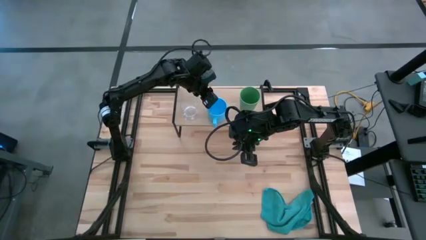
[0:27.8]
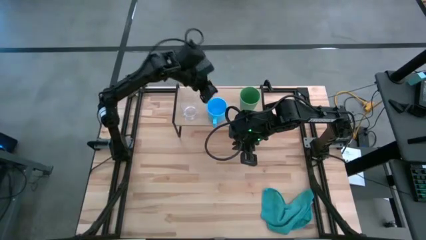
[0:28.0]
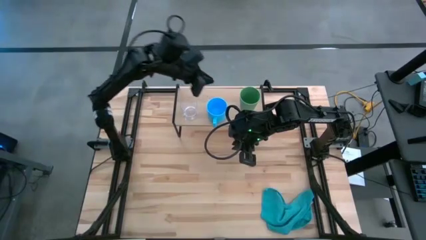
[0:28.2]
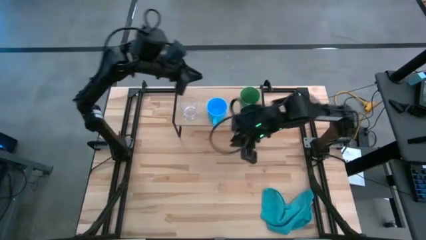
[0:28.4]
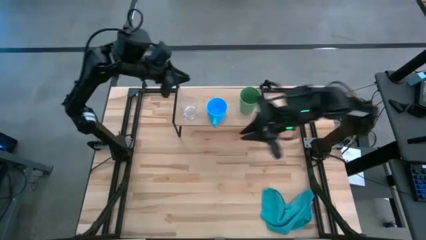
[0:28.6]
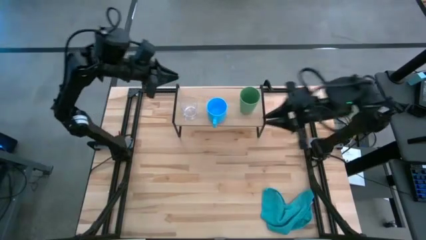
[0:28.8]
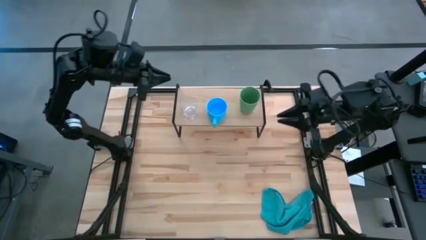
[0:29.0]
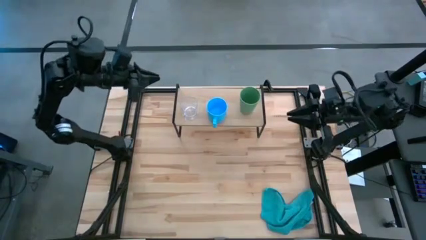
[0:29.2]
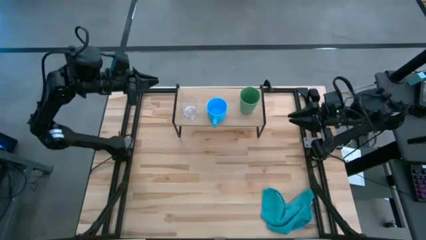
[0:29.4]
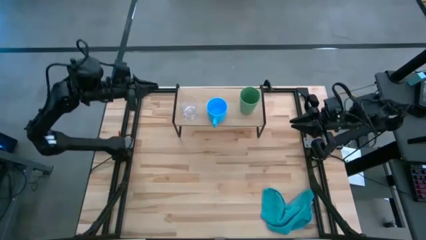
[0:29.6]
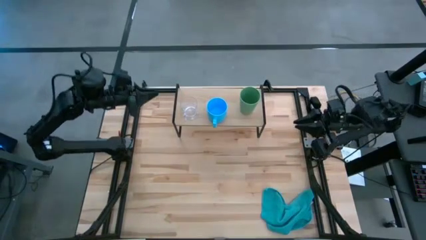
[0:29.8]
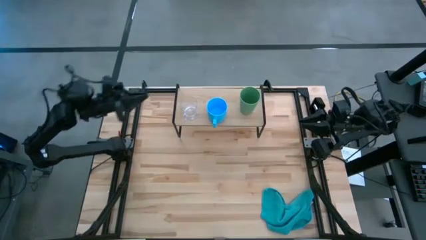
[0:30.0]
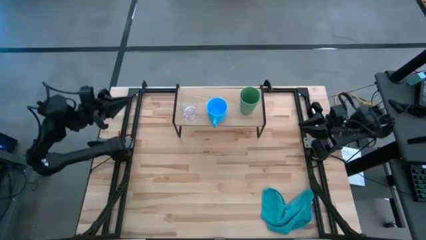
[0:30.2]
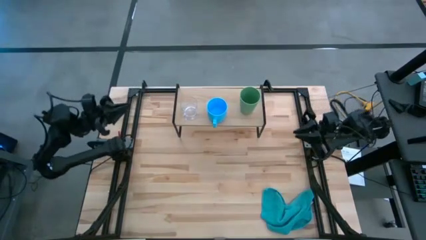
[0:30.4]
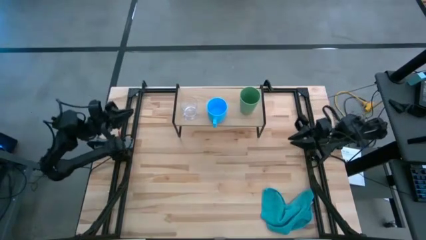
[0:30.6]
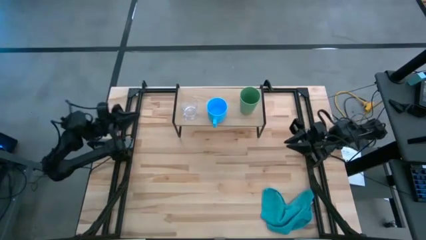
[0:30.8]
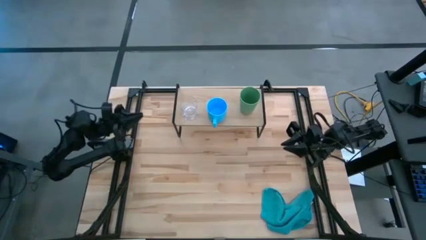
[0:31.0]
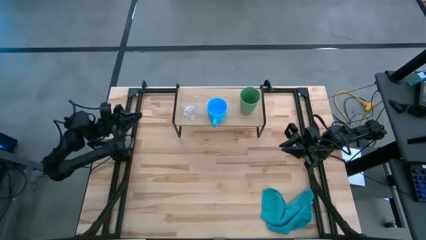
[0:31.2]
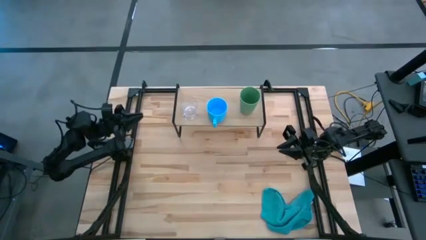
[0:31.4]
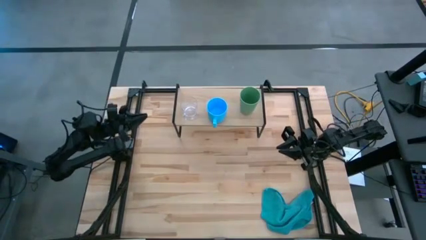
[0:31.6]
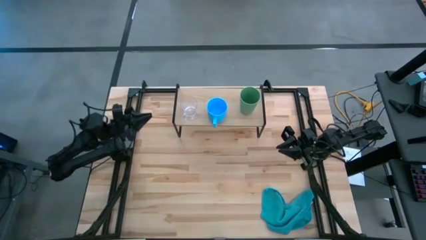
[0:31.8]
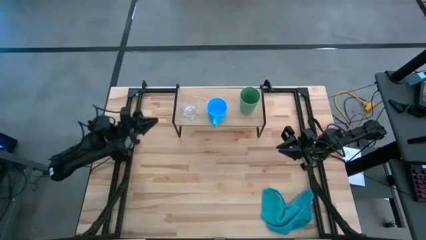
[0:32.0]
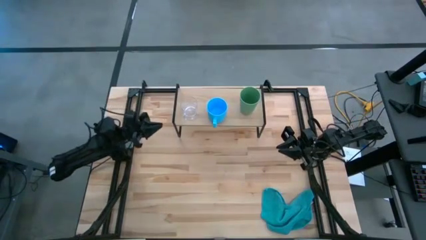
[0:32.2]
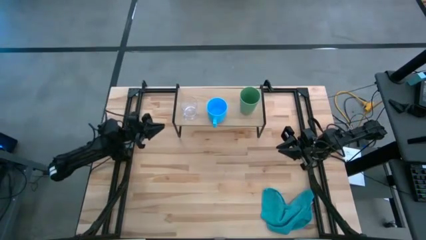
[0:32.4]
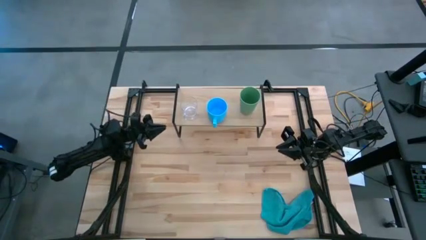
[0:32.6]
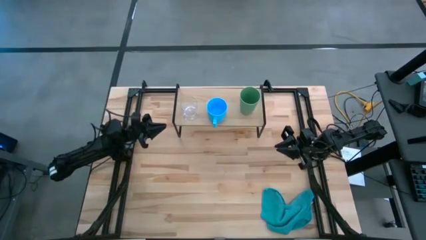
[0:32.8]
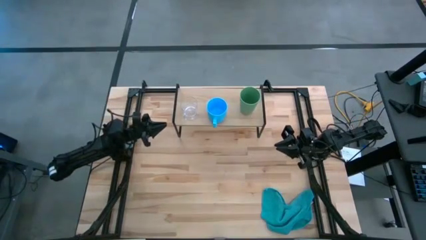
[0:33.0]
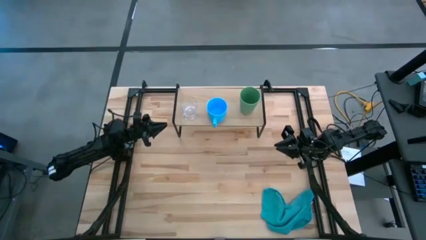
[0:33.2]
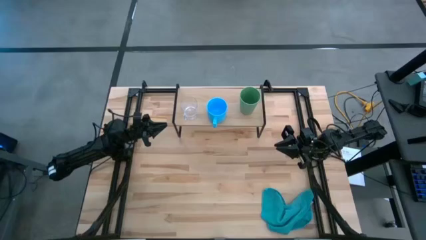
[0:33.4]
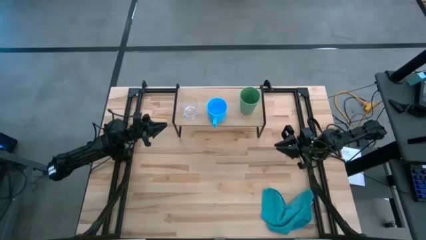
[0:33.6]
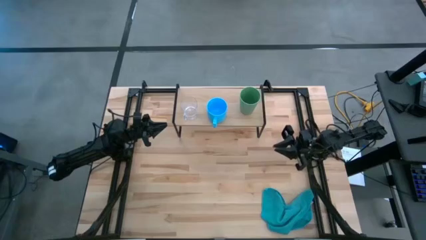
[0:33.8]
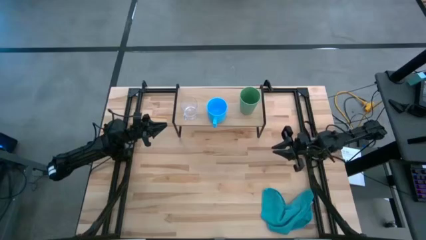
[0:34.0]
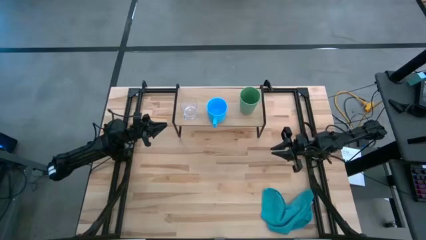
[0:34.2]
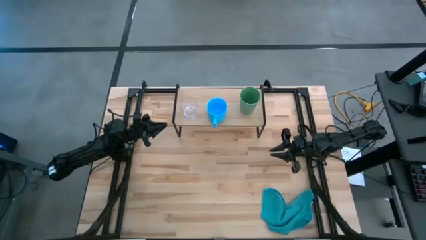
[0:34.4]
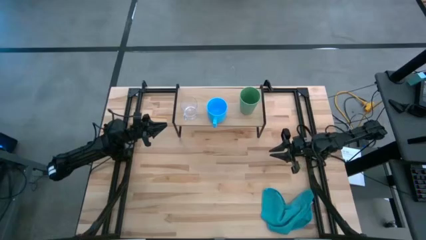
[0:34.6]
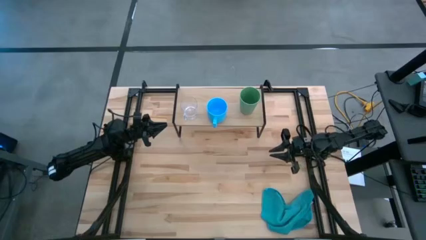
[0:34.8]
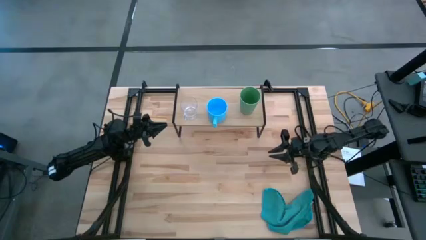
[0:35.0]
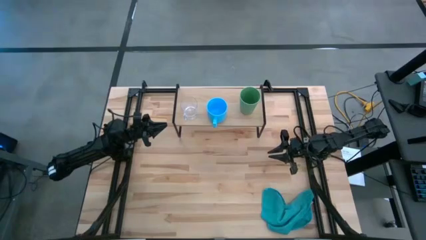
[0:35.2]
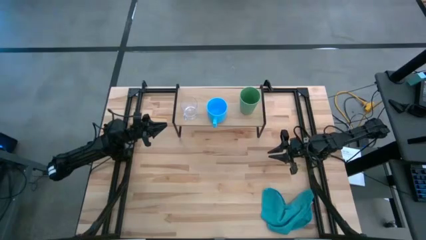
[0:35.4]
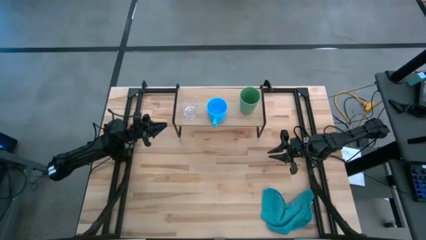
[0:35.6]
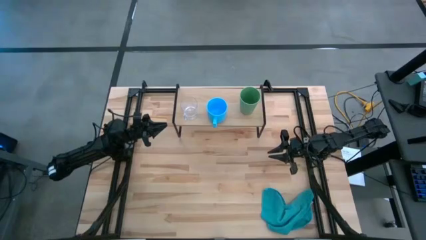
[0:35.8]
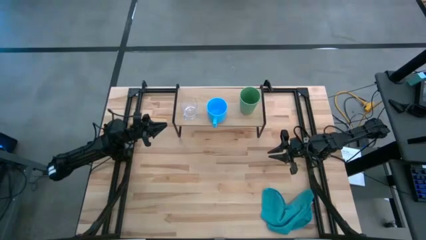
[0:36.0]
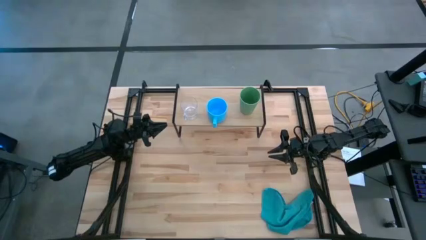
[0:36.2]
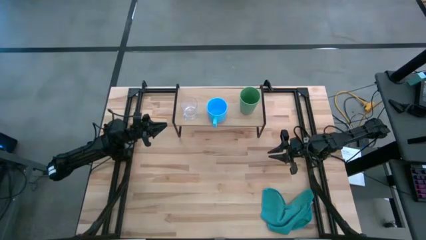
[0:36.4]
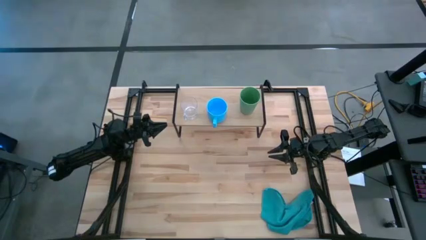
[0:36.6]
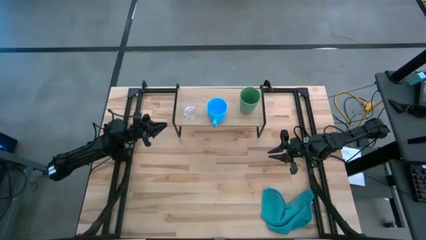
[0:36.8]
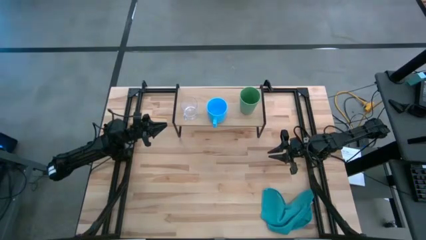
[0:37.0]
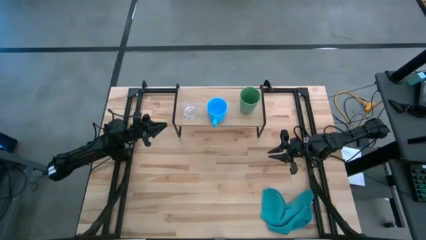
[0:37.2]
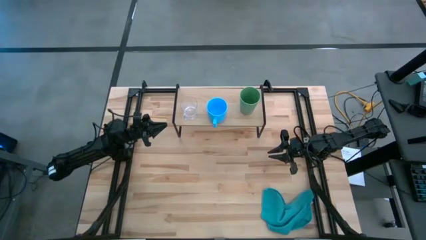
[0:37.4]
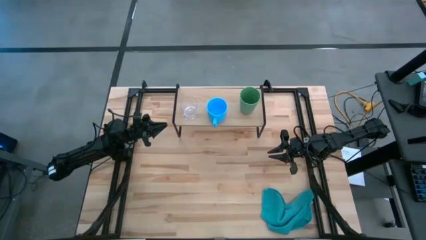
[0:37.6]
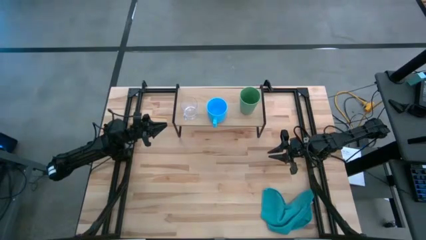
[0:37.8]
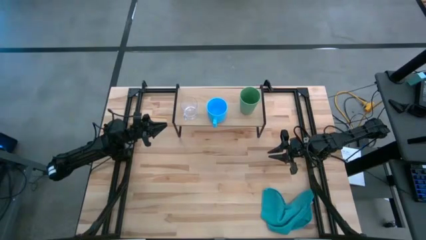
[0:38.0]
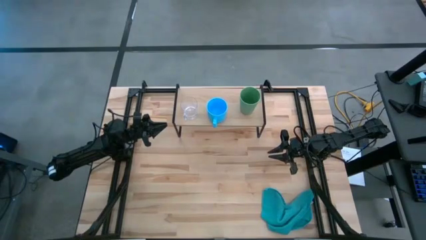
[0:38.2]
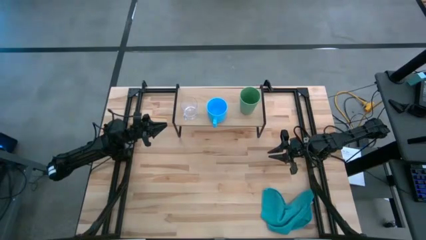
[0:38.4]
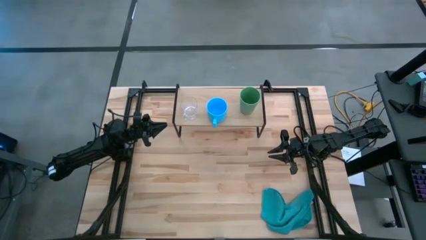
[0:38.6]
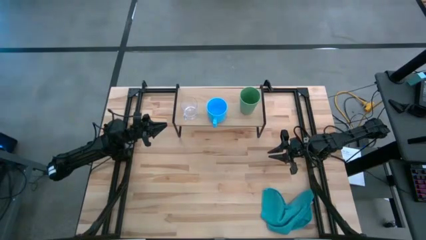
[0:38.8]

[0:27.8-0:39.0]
Task: Stack small to large cups/mugs on shelf
Return to Home Position

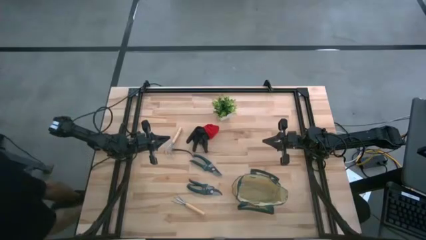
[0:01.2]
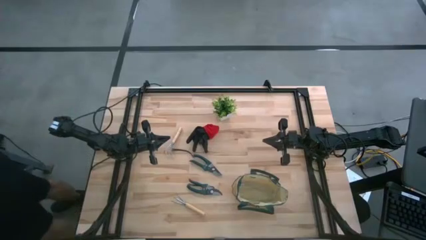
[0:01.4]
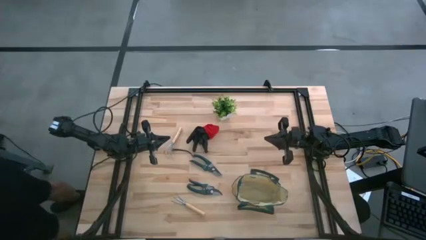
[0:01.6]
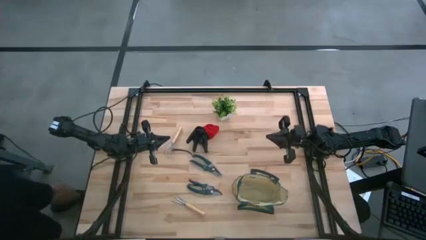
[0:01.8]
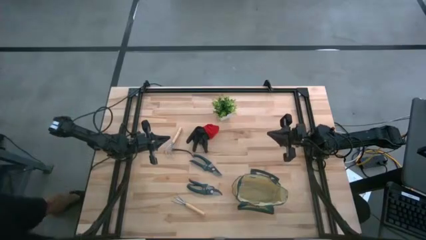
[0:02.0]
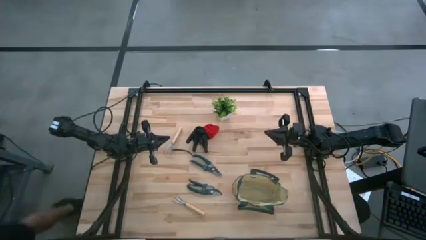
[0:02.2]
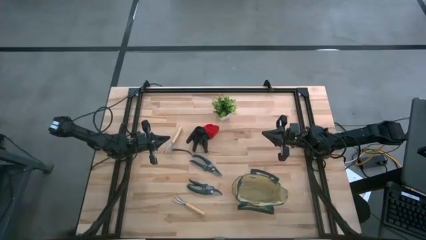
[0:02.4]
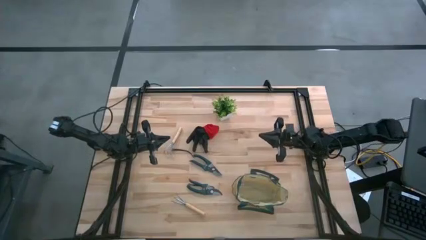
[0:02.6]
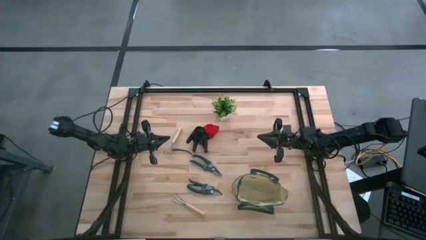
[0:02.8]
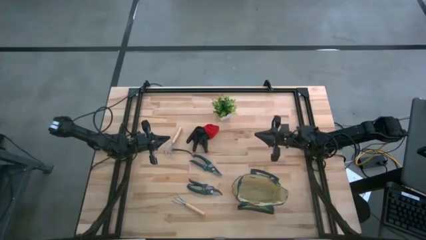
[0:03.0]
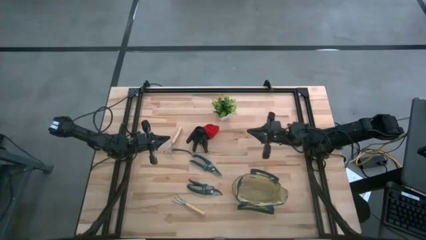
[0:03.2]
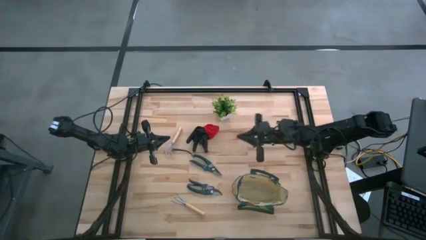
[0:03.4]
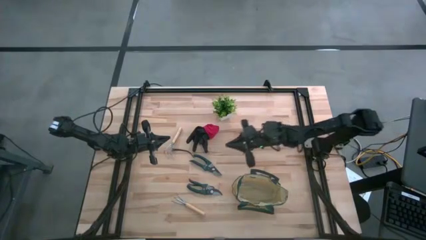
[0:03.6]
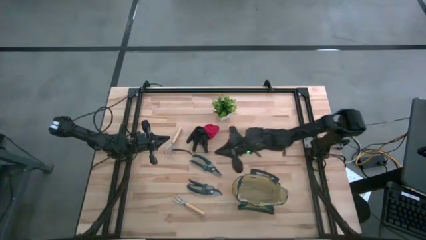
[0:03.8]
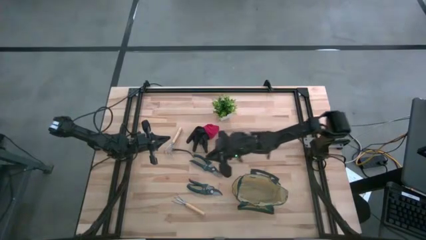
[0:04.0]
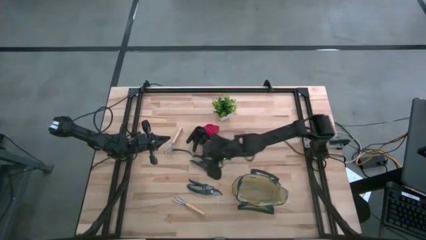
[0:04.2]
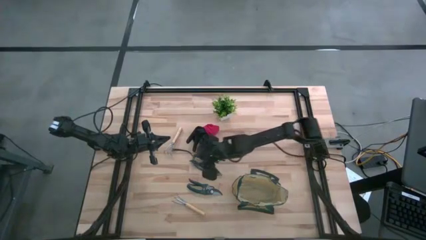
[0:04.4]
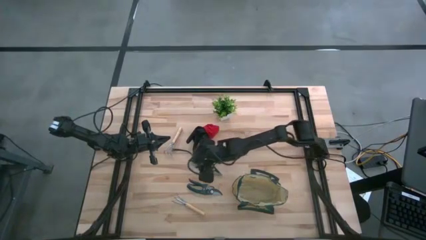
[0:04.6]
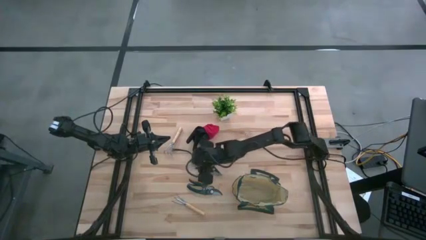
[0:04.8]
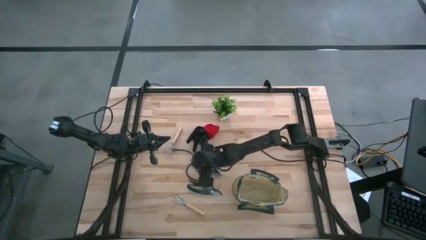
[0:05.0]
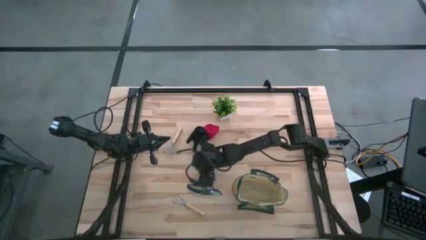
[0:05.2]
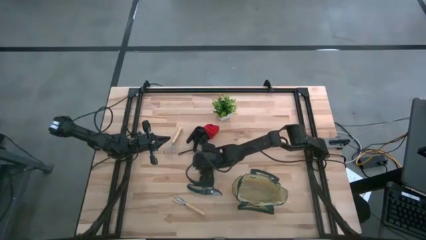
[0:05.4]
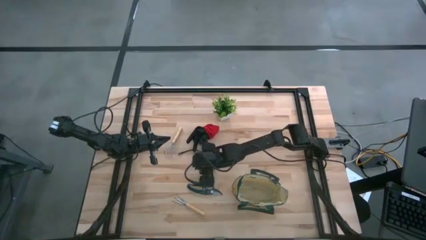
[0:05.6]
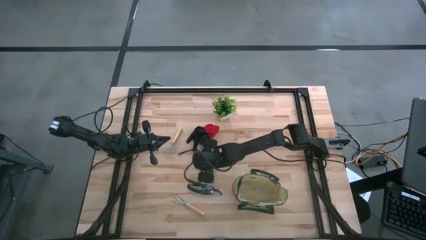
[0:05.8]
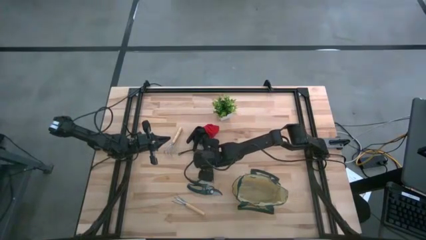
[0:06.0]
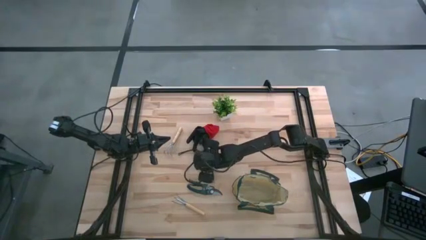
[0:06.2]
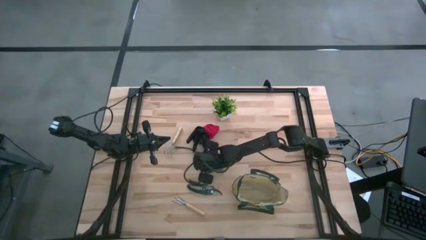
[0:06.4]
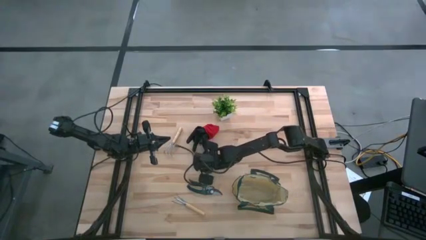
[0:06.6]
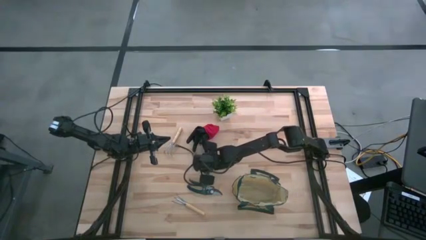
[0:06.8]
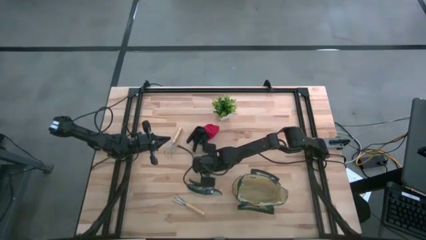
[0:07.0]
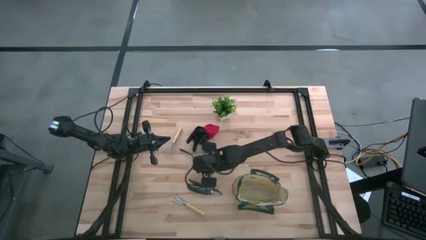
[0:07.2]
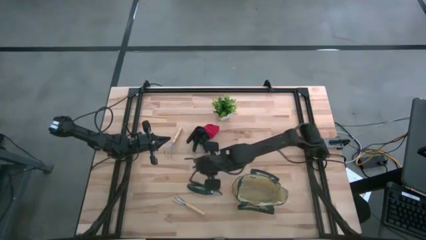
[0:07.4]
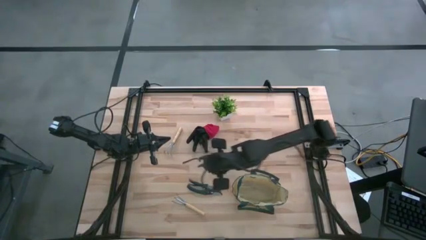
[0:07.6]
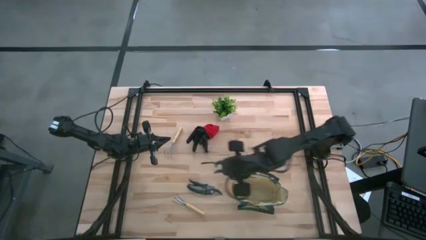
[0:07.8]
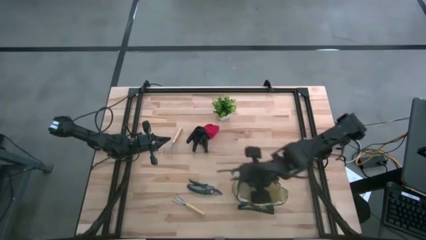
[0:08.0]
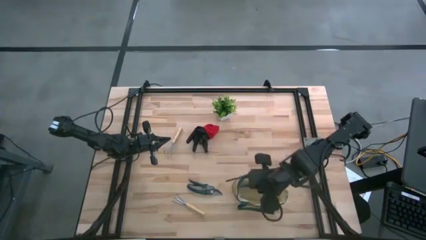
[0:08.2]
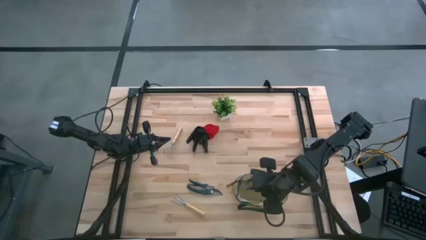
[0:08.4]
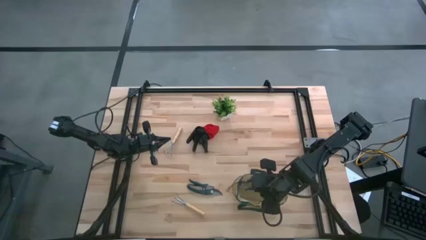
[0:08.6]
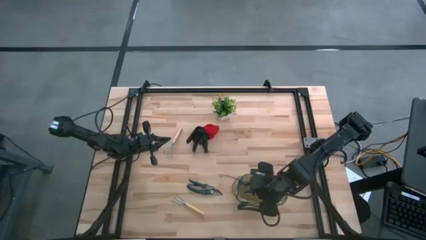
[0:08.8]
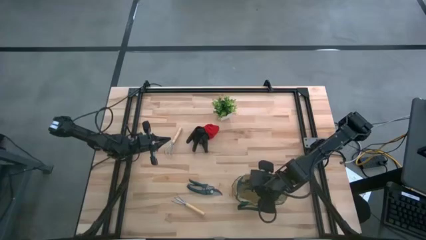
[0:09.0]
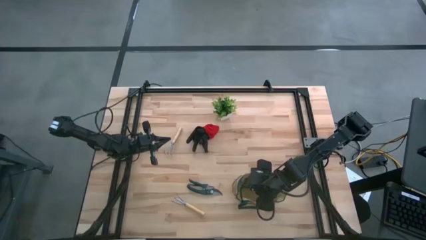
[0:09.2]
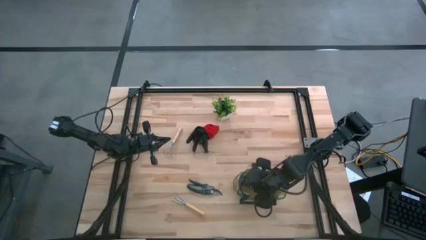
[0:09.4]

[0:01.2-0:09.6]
Task: Pick & Place Garden tools in Gardening bag
Put the top shear scissors into the gardening bag
